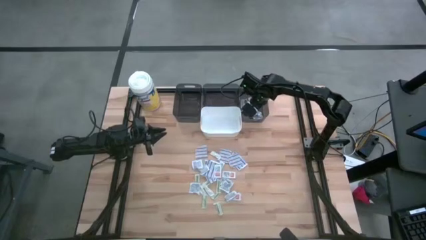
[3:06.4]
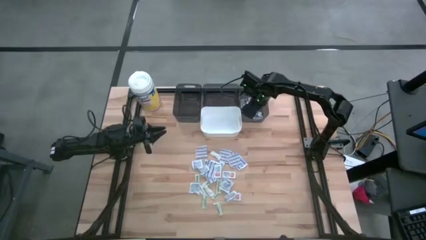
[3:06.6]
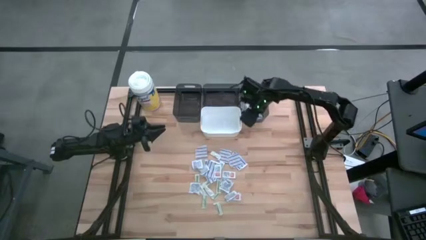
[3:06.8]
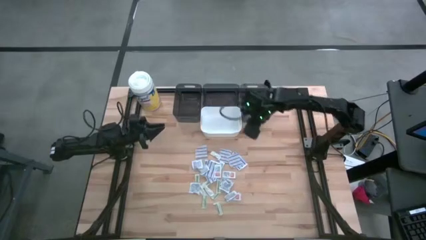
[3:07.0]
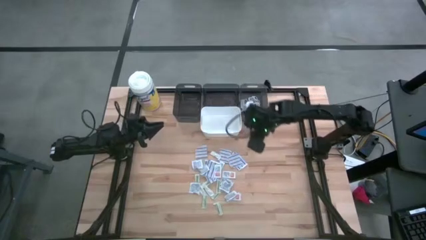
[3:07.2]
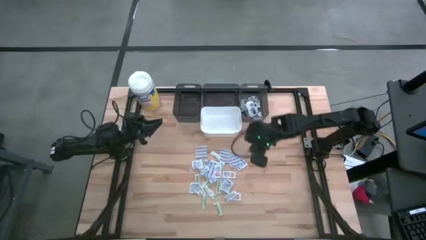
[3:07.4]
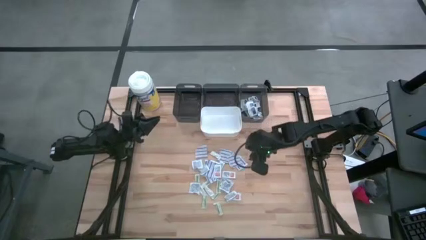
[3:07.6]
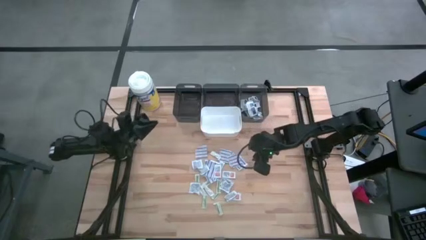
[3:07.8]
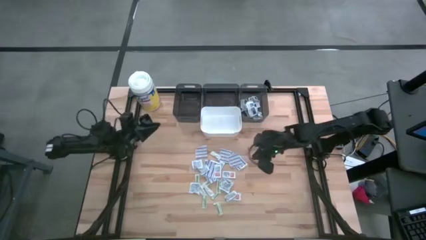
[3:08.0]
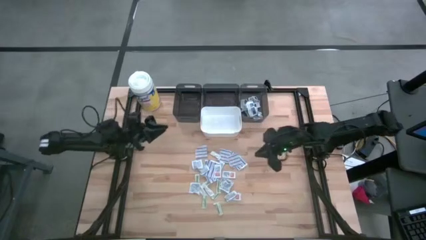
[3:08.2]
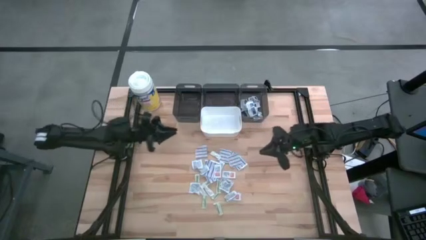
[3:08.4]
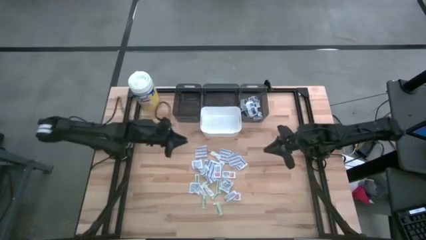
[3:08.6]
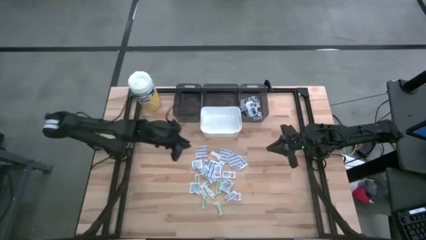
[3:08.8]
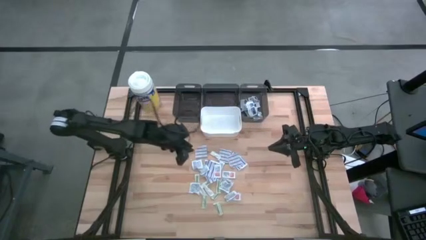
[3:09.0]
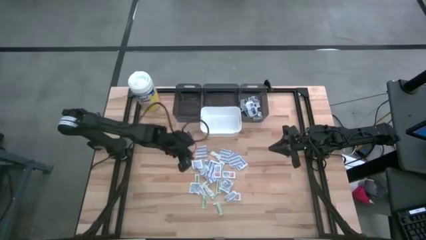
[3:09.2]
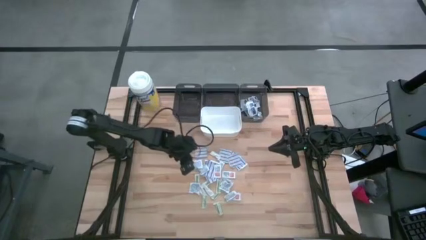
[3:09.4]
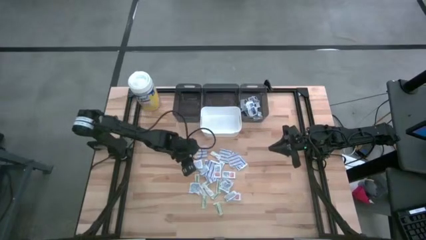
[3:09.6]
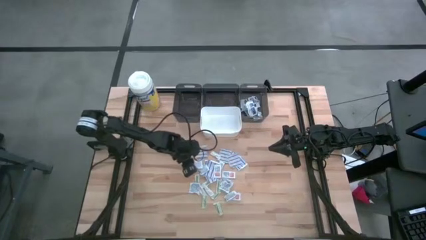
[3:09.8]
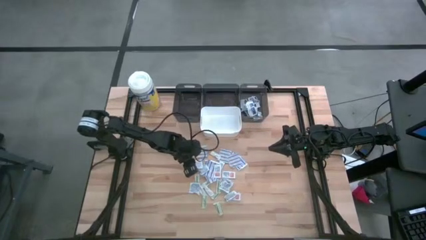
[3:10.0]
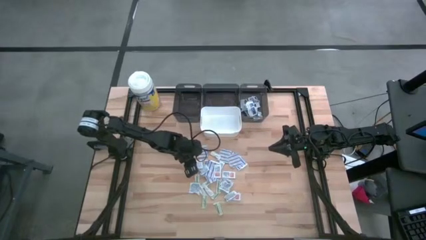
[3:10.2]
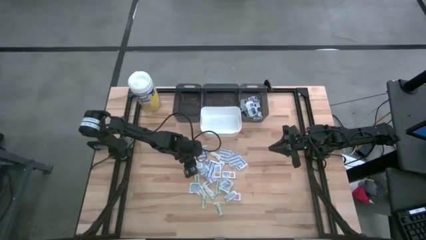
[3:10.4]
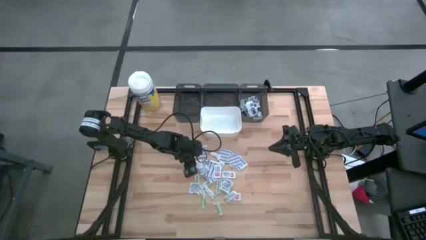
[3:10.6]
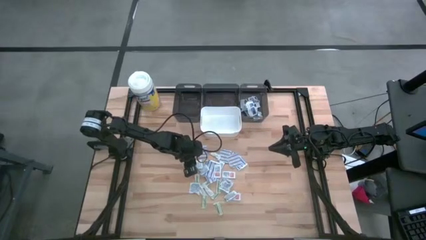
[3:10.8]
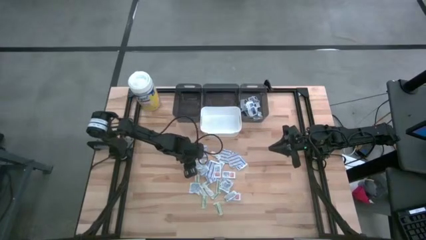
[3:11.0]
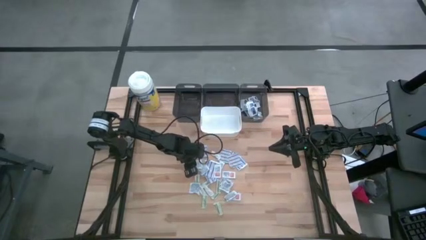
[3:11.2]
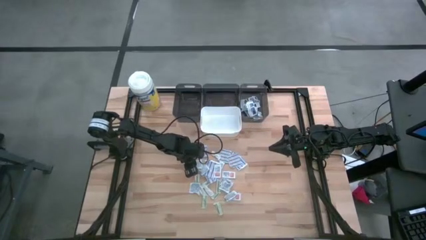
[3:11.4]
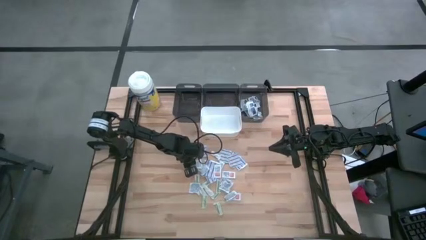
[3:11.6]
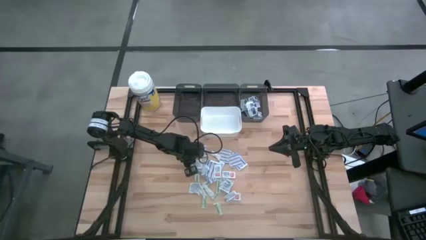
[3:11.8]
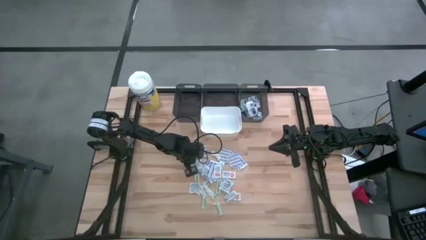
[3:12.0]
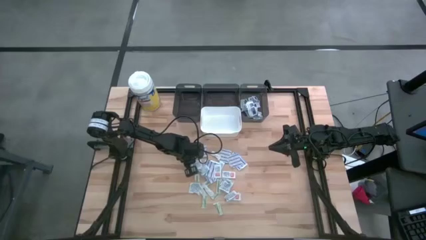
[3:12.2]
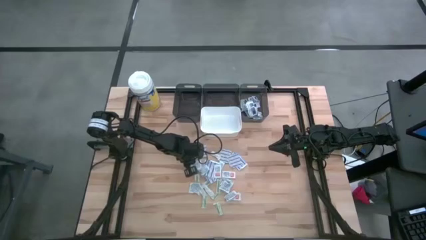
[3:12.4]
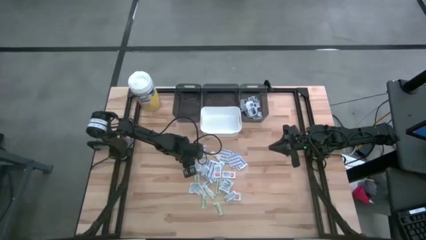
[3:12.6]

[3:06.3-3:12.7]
Task: Pick & Place First Aid Supplies
Put the blue alcohol pad into the right black bin

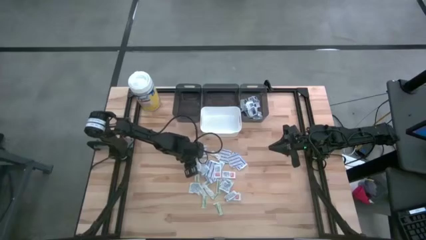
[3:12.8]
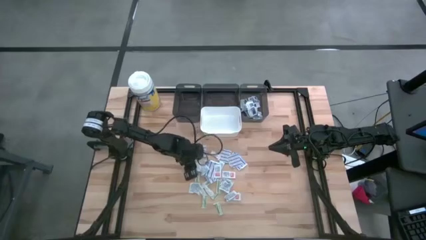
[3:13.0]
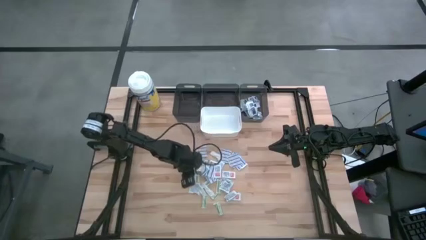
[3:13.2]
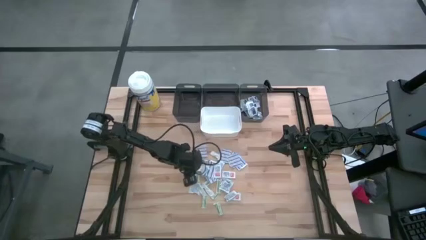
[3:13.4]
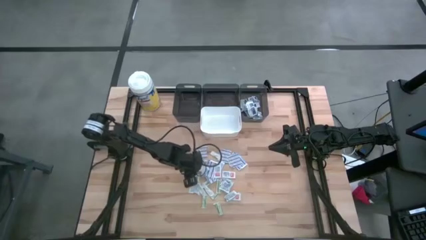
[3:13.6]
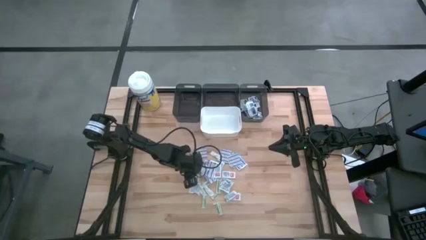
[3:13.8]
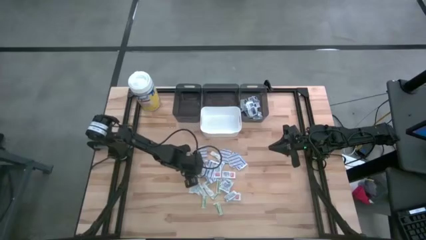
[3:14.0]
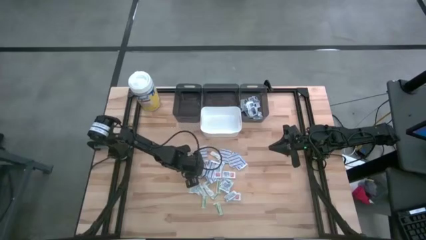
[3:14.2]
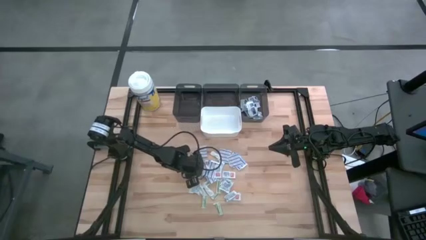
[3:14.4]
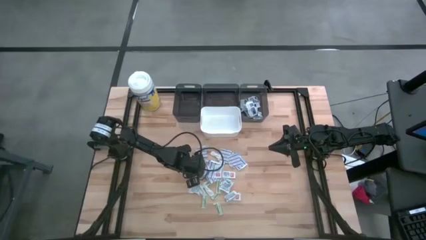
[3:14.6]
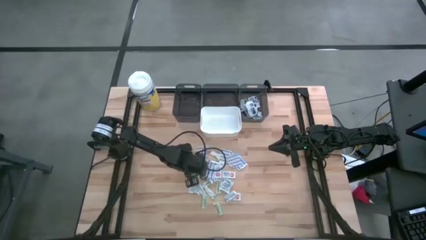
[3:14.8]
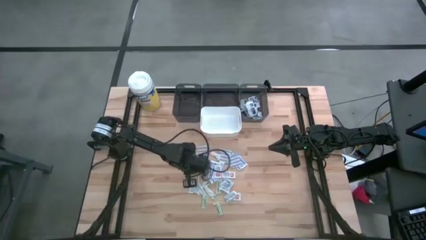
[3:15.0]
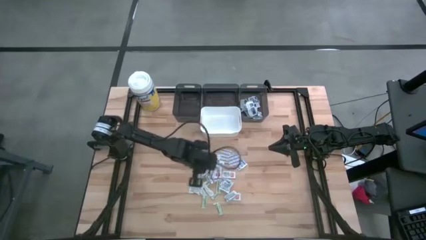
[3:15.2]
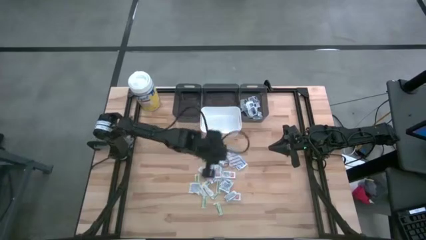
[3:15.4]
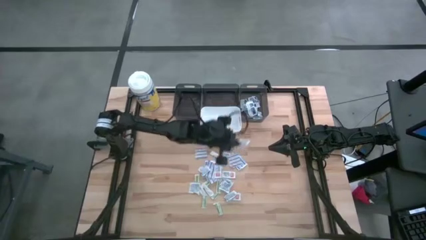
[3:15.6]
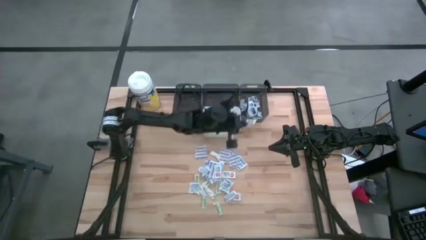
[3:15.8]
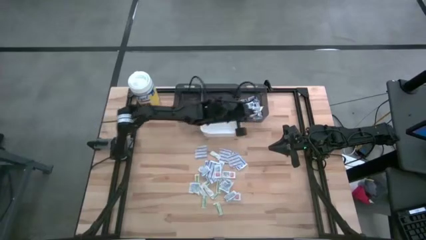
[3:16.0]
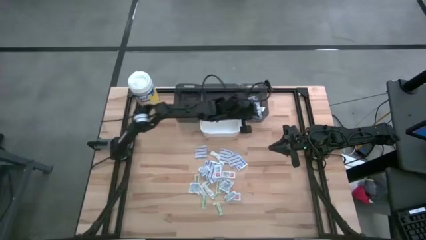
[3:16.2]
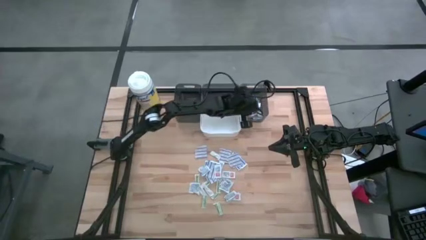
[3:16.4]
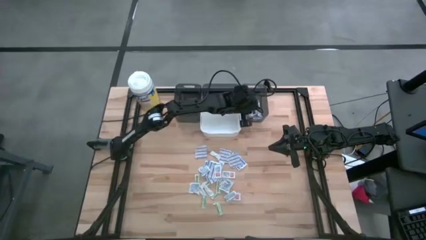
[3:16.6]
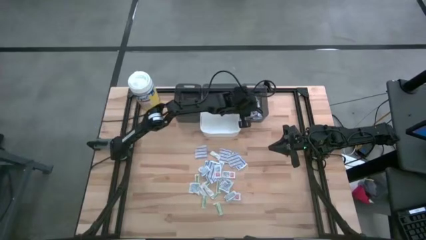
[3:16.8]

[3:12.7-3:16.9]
Put the blue alcohol pad into the right black bin

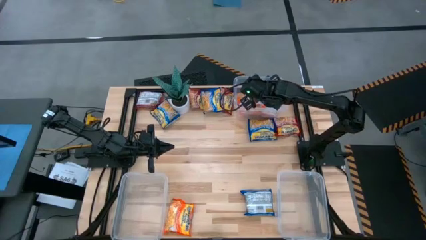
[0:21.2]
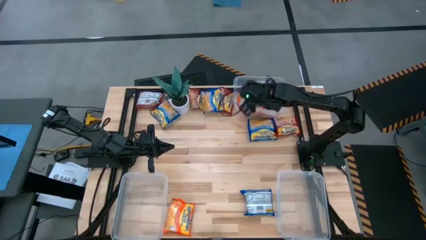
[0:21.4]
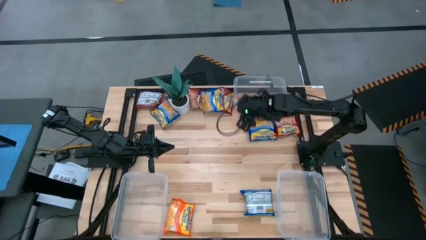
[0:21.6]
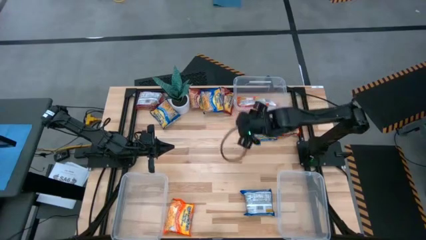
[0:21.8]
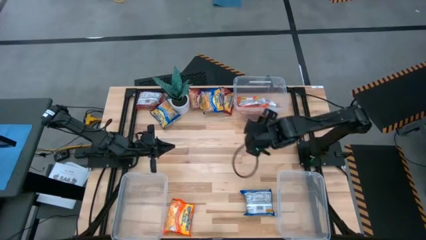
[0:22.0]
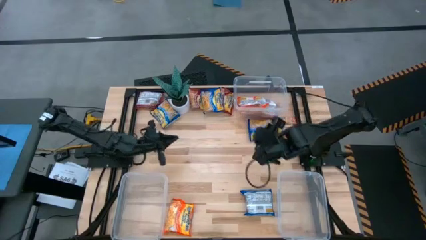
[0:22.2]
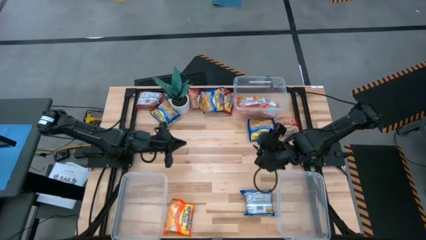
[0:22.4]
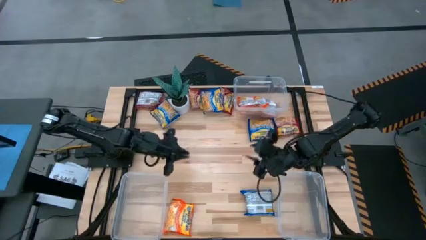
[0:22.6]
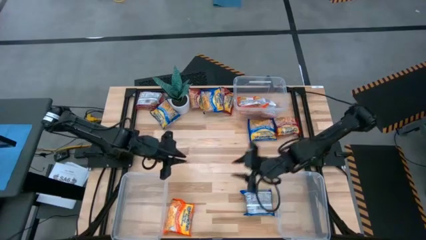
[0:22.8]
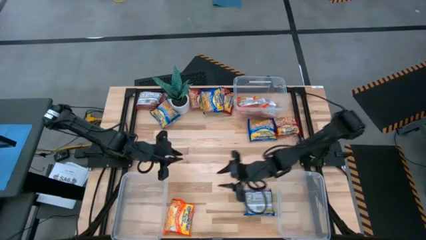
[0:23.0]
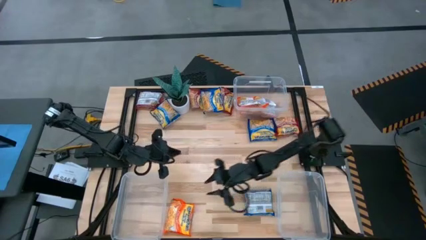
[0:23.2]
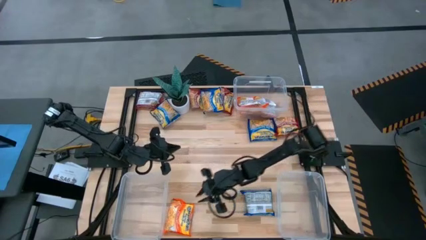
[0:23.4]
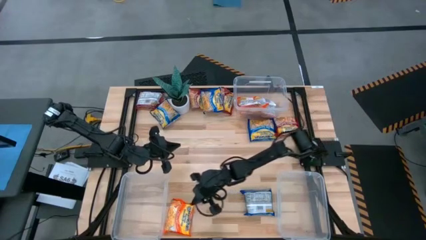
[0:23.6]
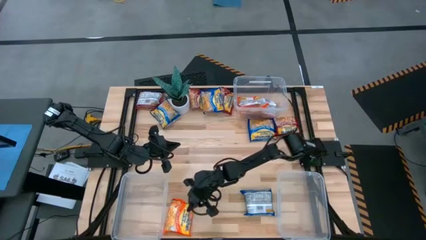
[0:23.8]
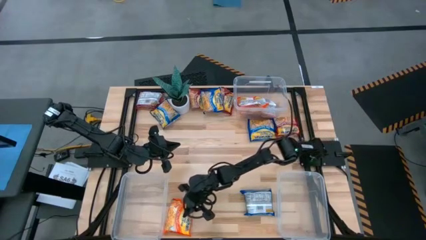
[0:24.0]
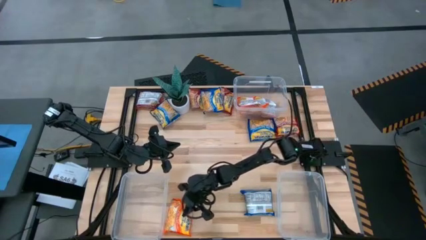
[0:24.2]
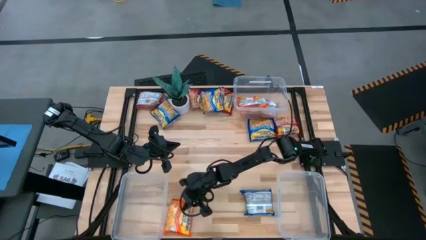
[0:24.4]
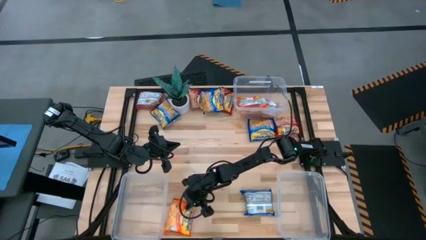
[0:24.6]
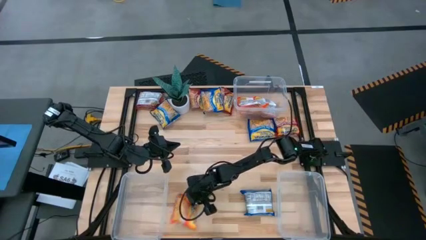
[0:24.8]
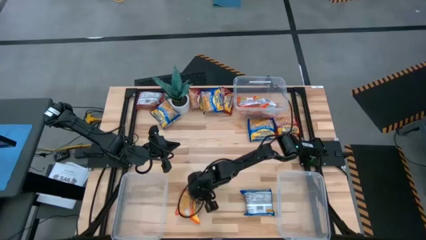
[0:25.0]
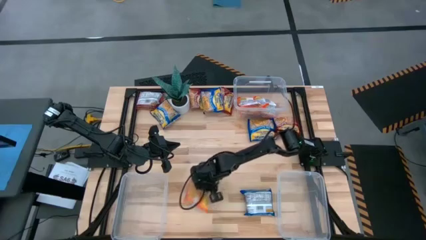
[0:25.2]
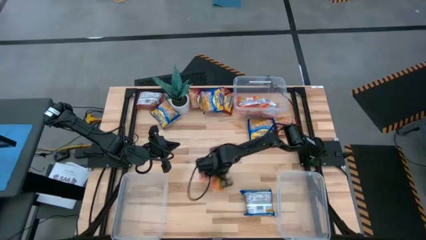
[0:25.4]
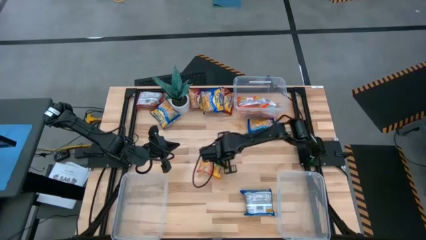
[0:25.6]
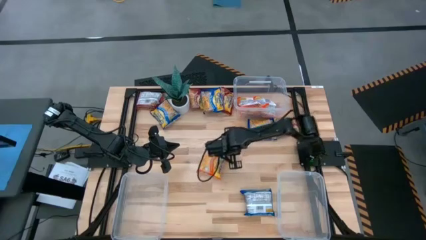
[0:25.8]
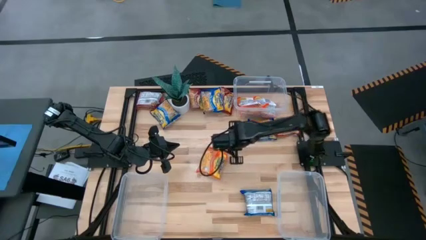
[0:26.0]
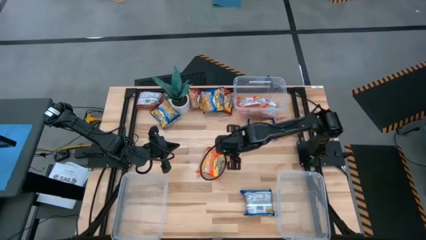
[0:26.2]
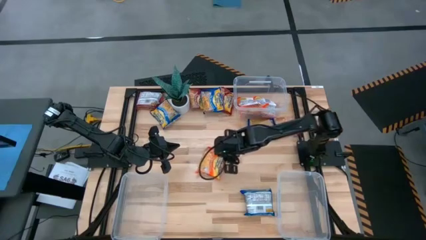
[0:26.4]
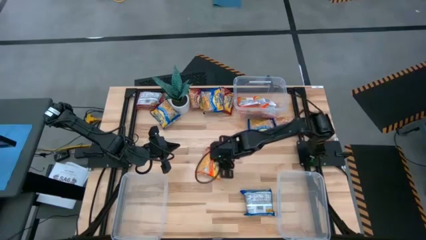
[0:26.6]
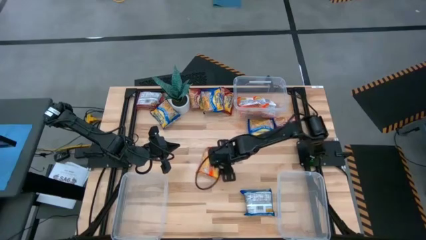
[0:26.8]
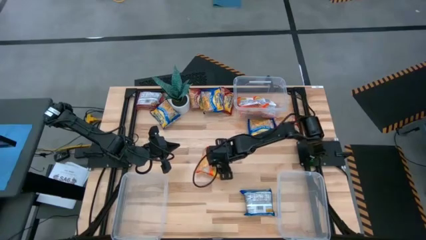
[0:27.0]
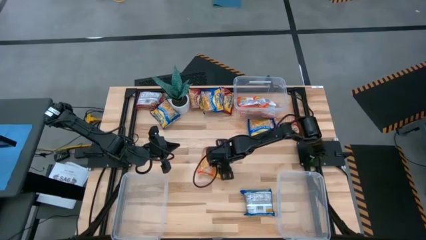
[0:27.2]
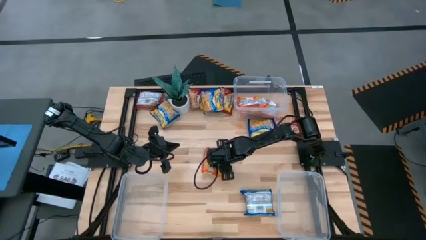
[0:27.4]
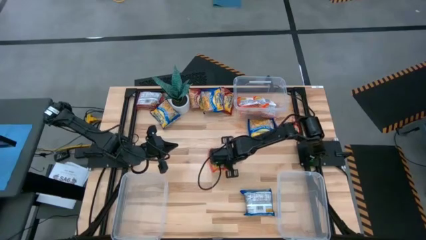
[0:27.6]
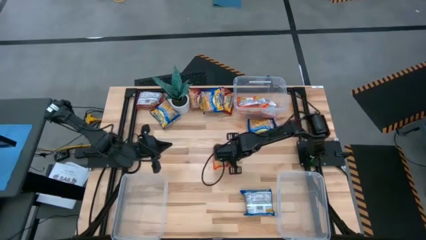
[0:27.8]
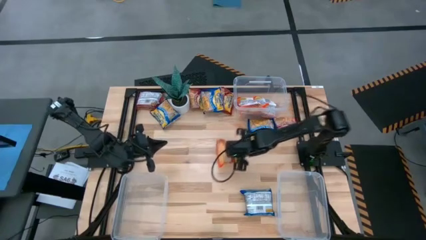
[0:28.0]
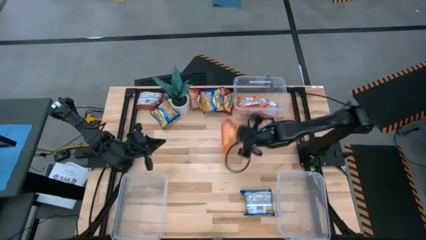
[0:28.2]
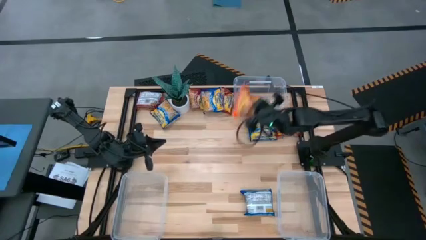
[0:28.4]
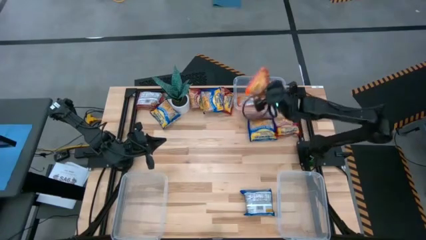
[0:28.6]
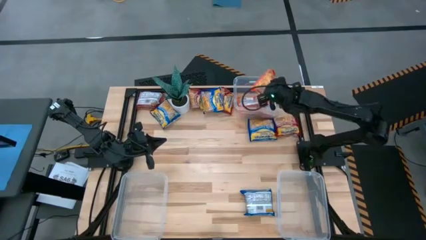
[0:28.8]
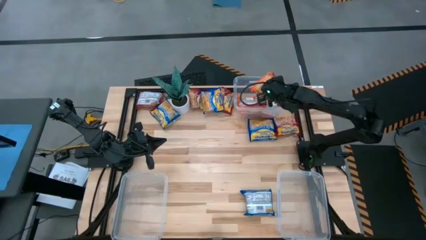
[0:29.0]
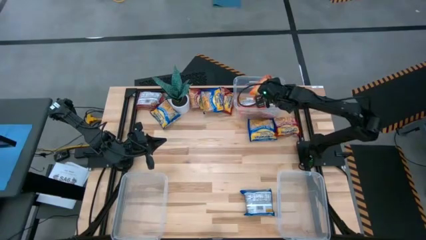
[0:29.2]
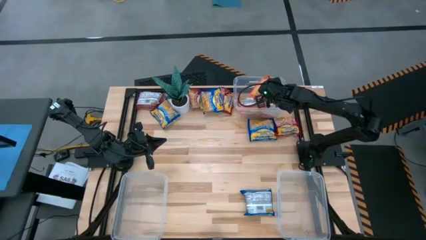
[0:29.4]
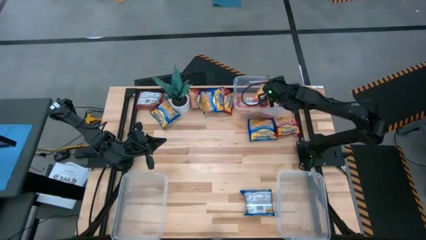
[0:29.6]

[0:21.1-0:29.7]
Task: Sort Maruchan noodles
Put the orange noodle pack into the top transparent bin
